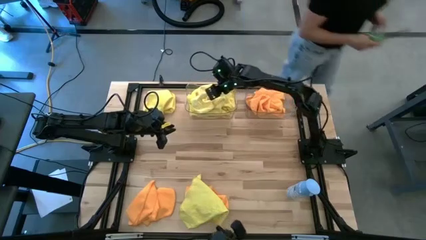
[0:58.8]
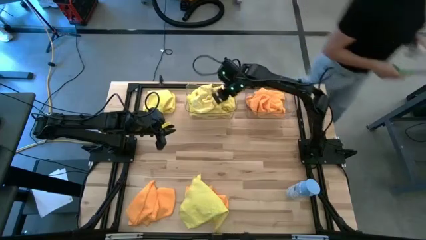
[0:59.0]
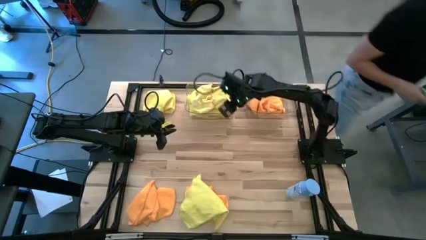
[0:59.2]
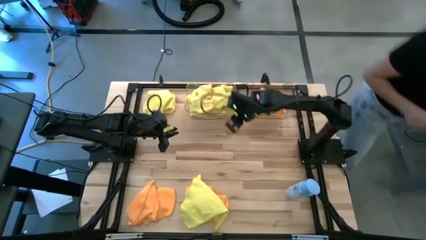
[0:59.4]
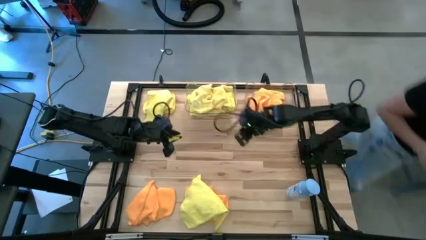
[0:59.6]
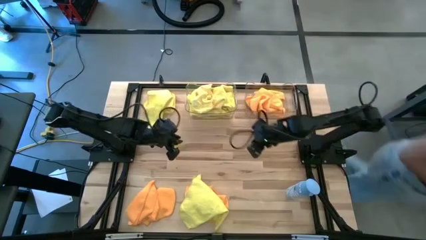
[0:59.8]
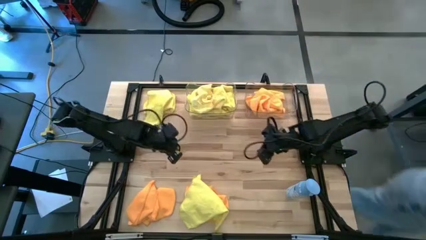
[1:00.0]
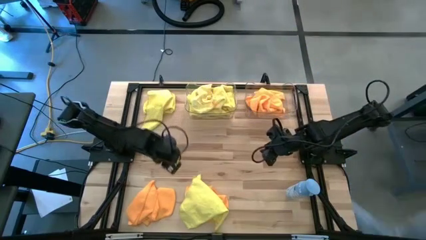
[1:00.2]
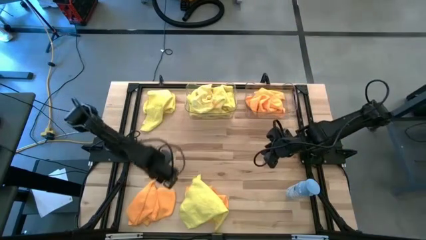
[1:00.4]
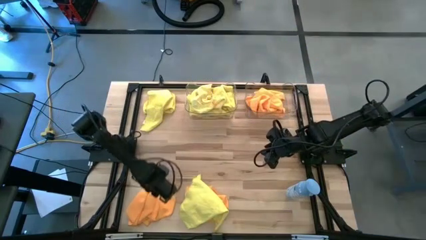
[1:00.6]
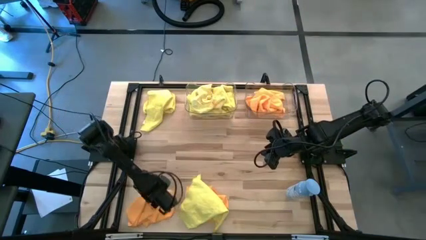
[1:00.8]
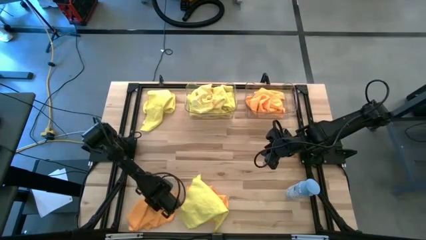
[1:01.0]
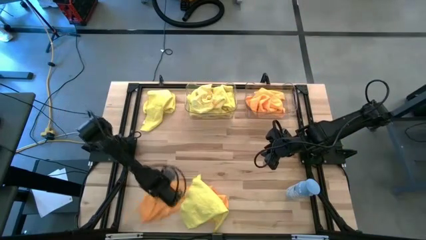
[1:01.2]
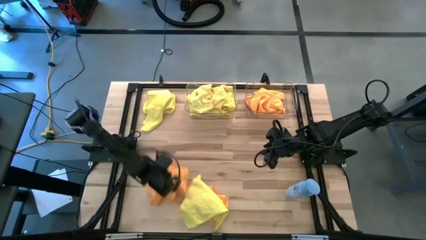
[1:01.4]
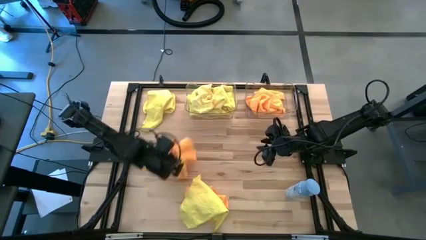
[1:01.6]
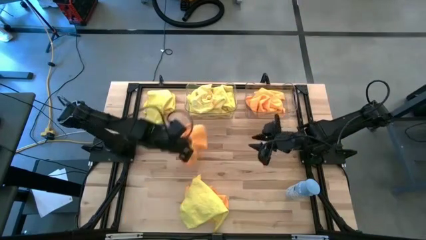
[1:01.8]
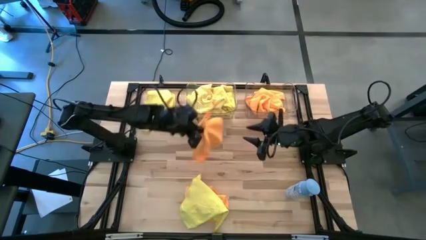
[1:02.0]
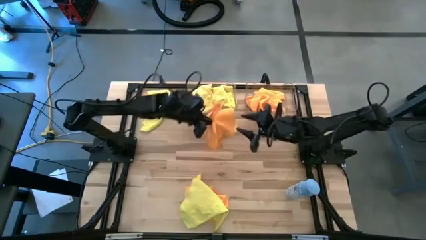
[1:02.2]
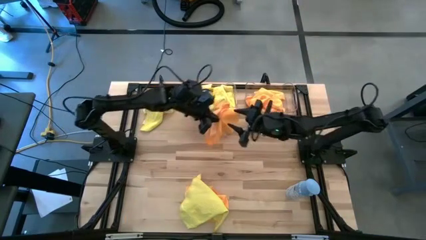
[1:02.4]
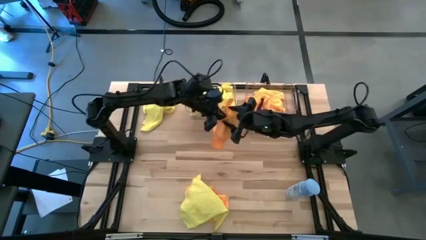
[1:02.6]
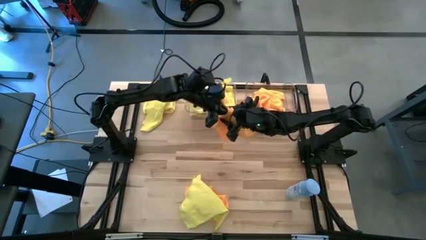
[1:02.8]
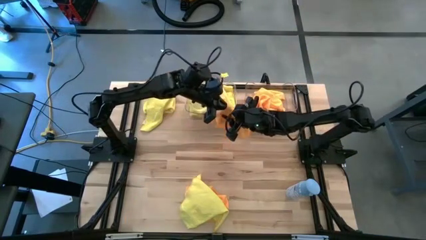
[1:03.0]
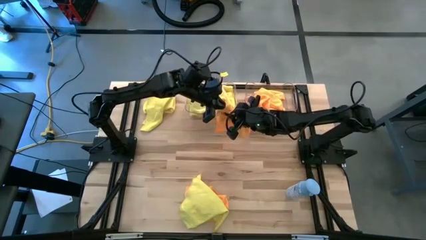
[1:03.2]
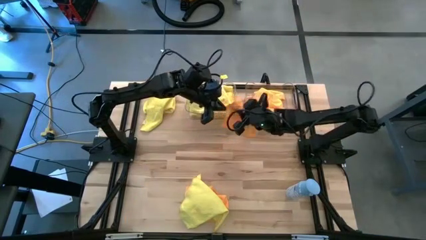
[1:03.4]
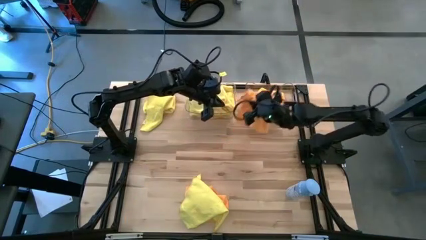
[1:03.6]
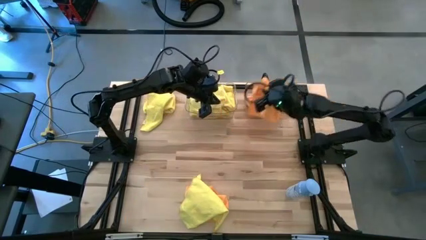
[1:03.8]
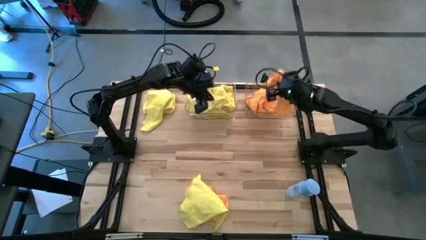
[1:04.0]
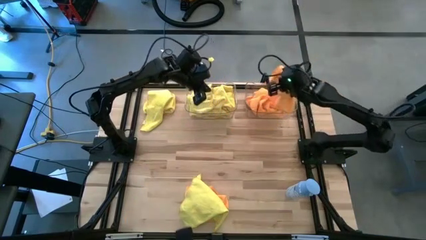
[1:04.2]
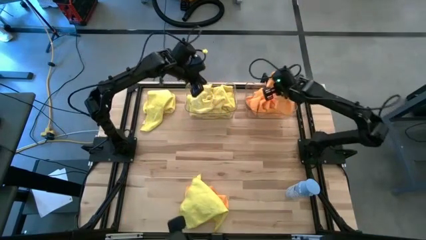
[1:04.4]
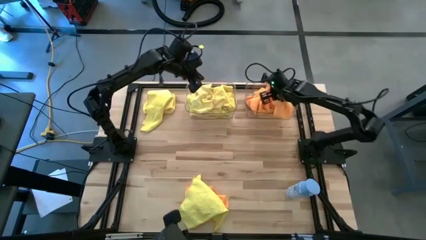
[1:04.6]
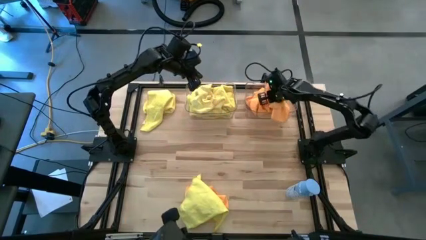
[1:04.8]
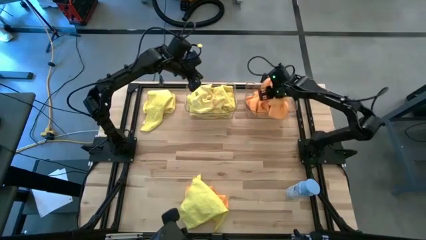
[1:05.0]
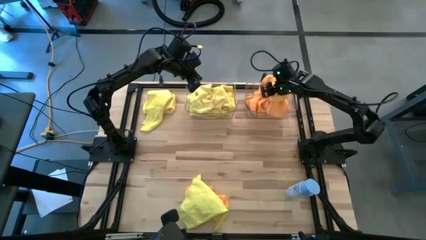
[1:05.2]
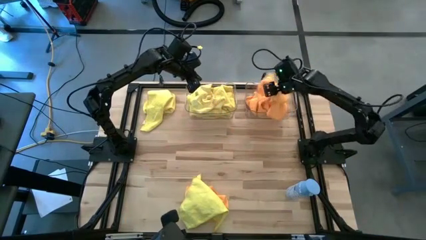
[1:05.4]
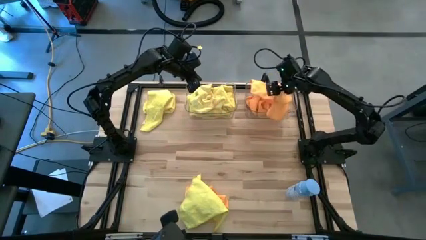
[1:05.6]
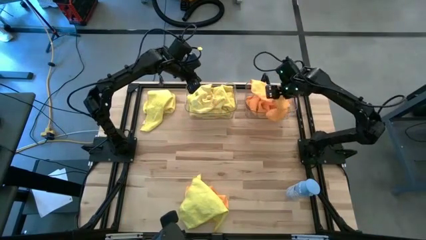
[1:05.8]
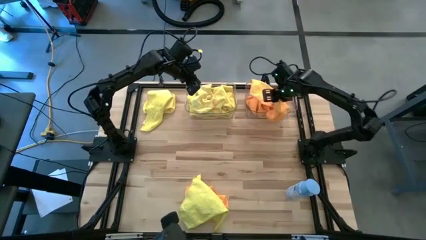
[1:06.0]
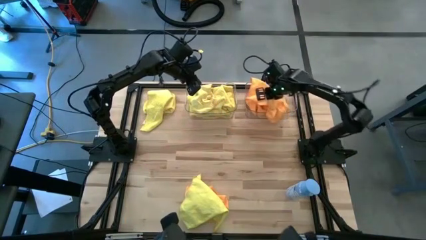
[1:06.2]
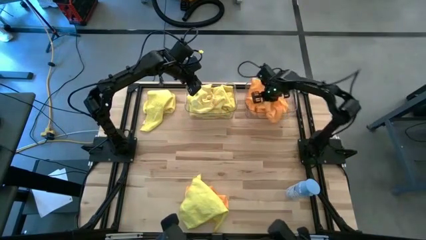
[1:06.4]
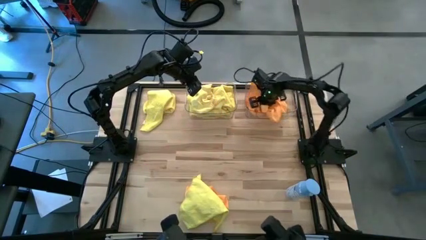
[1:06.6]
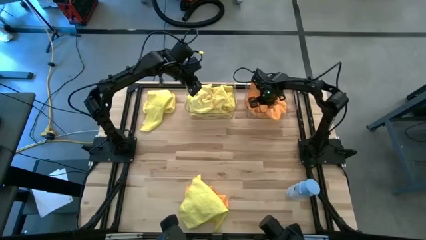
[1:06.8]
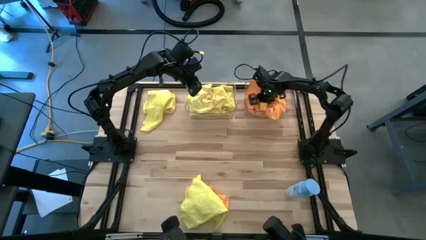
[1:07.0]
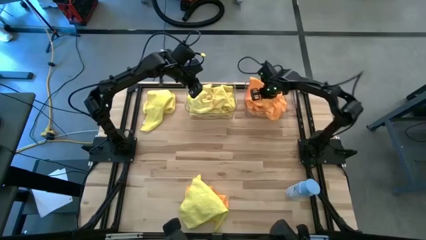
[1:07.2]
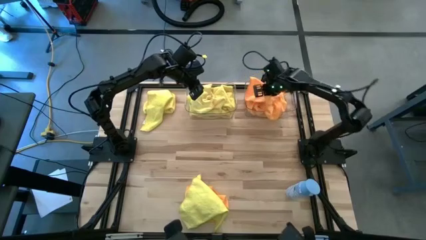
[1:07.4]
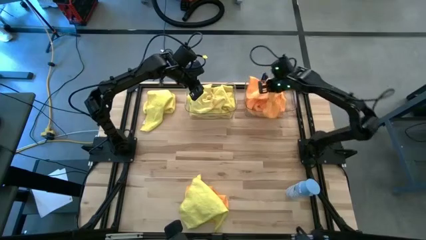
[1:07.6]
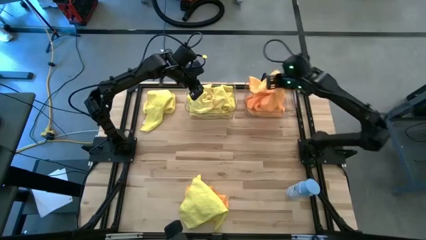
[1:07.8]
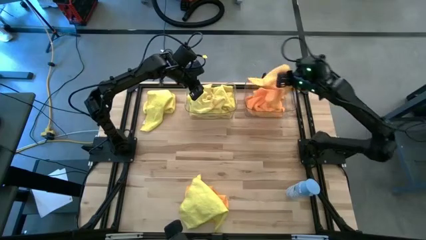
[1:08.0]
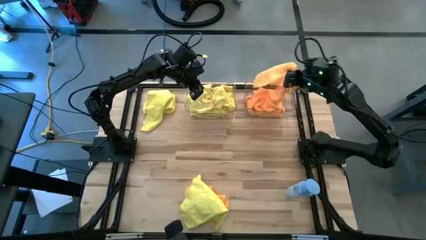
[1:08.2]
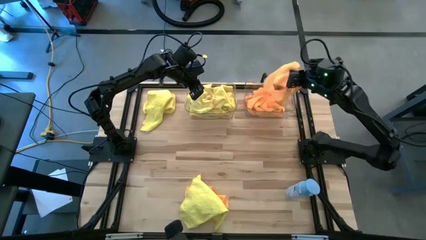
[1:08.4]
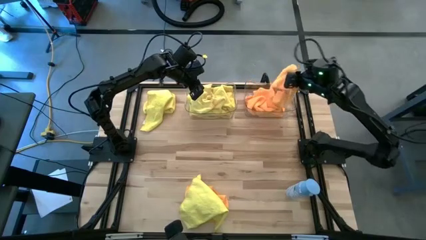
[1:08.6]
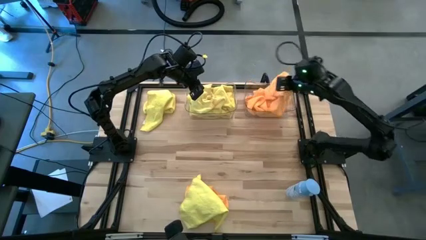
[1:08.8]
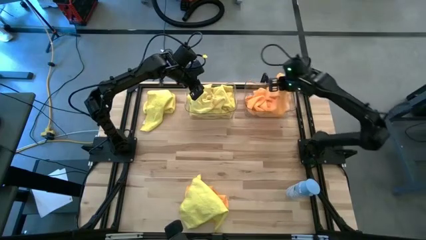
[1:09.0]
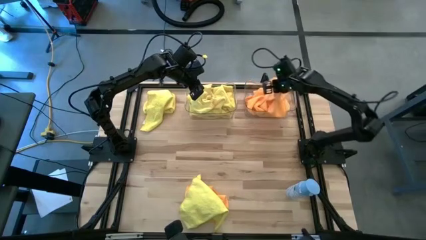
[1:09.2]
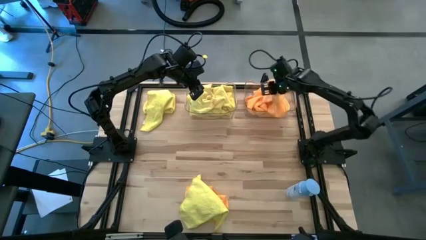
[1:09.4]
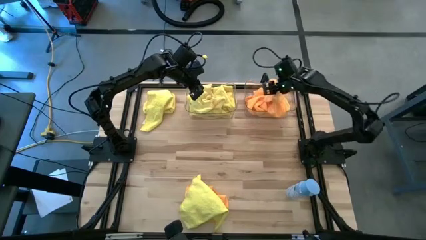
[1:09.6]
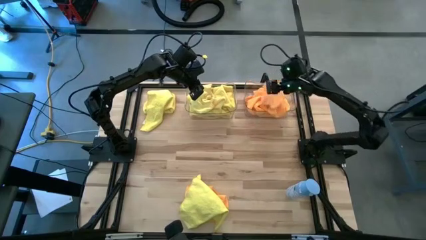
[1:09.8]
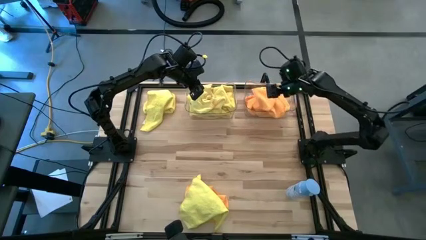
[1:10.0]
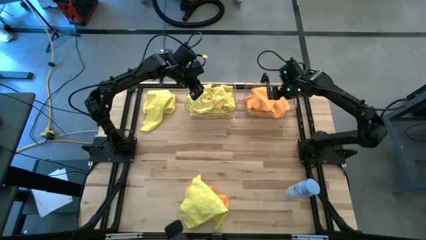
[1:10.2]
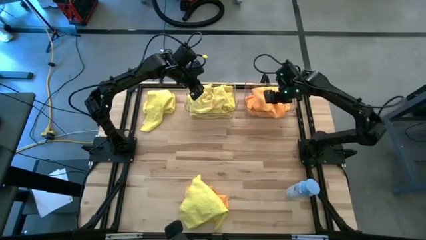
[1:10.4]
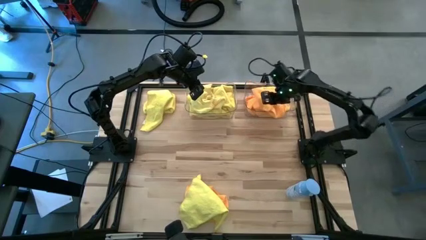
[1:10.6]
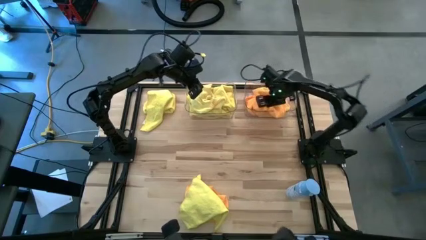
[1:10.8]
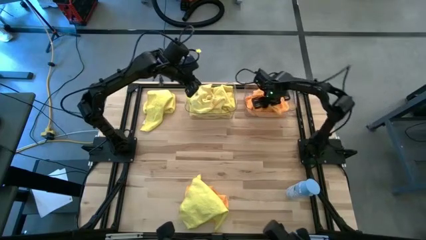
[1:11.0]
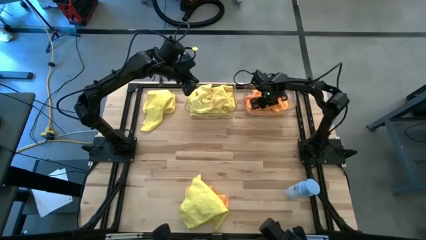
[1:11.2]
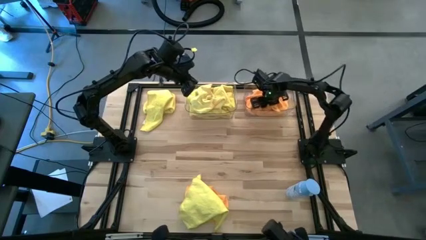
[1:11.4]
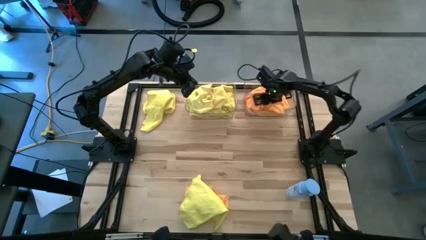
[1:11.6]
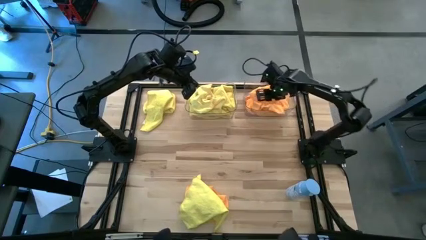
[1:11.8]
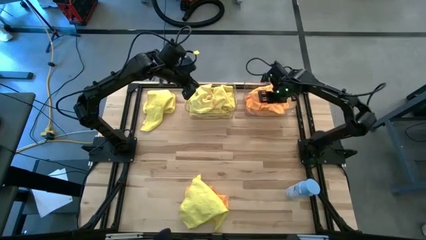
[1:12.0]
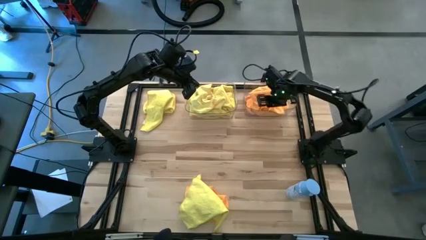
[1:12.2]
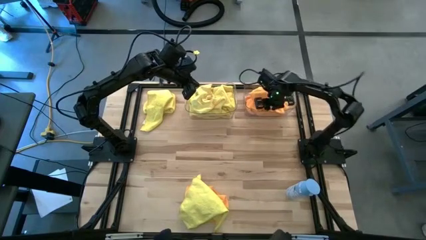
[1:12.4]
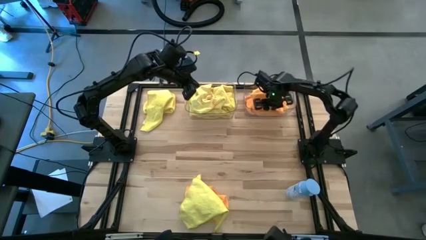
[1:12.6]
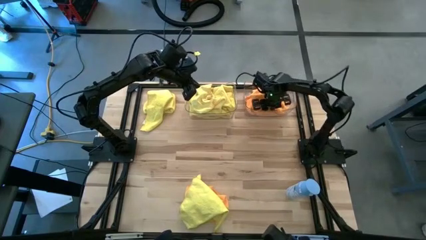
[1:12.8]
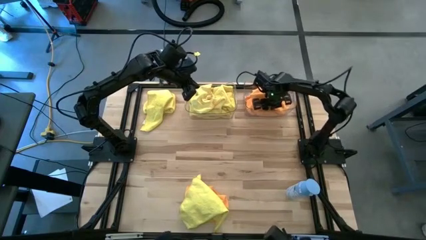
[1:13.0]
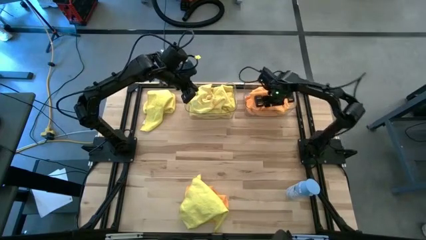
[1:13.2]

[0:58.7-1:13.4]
Task: Sort microfiber towel by color & place in baskets
Put the orange microfiber cloth into the right transparent bin

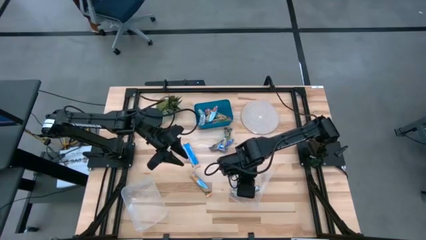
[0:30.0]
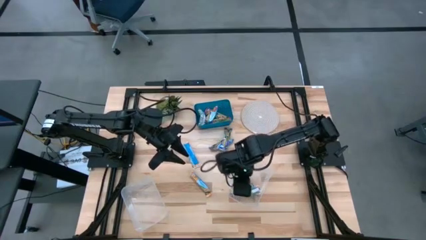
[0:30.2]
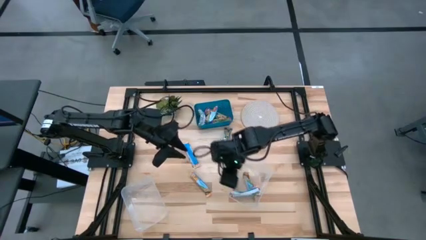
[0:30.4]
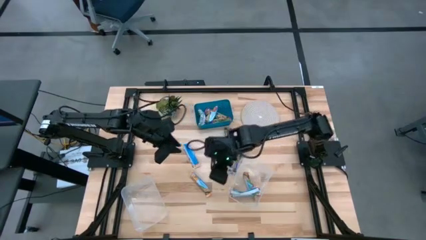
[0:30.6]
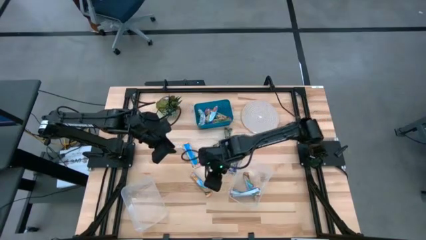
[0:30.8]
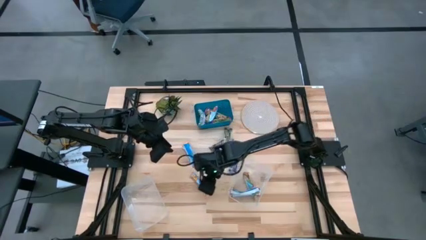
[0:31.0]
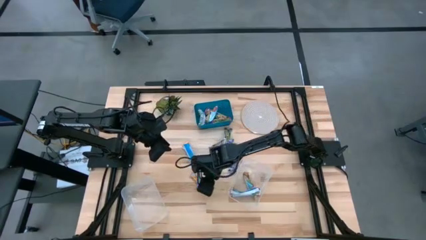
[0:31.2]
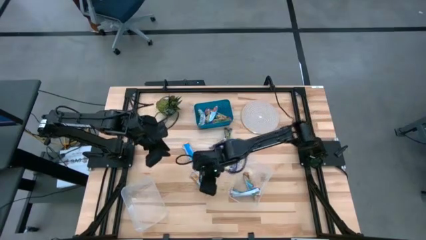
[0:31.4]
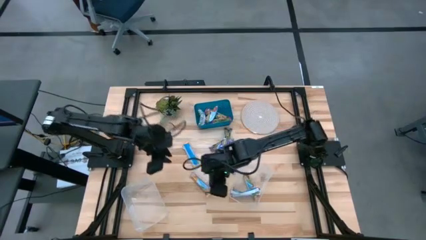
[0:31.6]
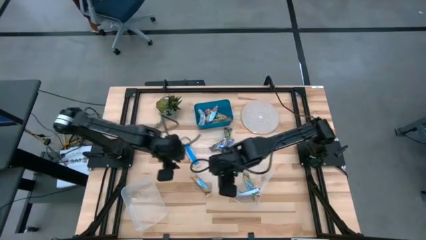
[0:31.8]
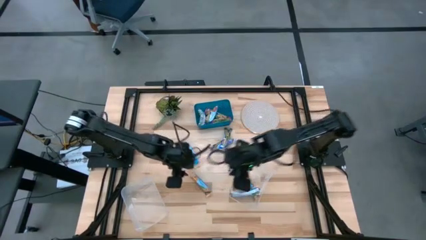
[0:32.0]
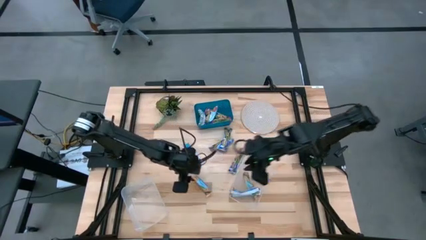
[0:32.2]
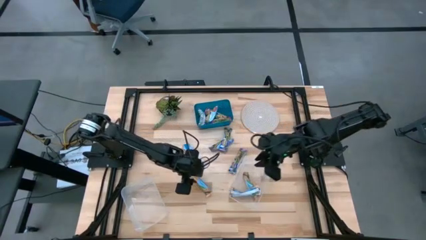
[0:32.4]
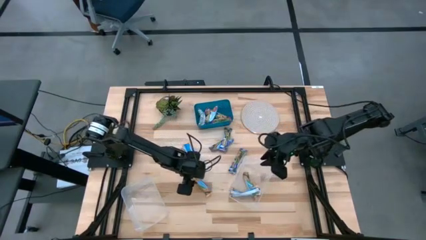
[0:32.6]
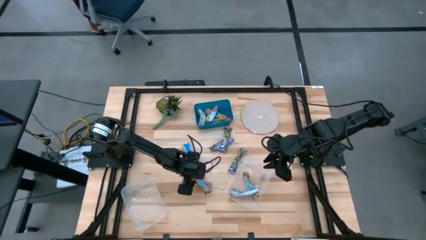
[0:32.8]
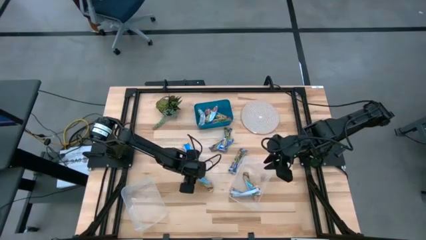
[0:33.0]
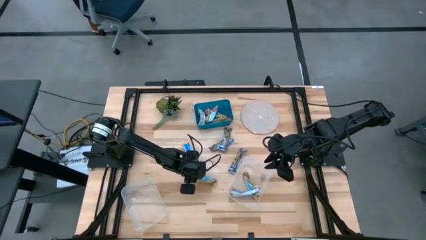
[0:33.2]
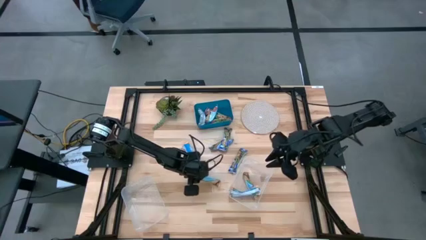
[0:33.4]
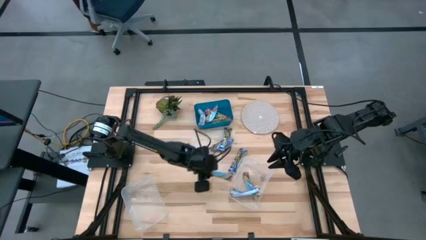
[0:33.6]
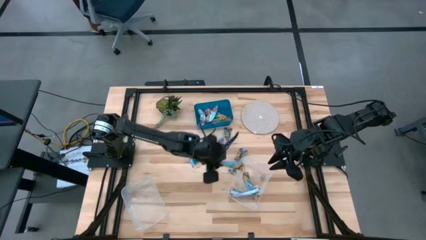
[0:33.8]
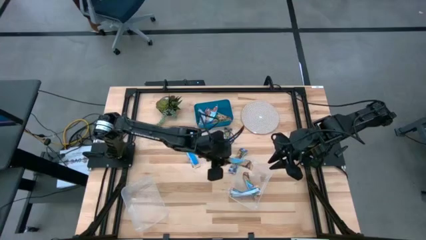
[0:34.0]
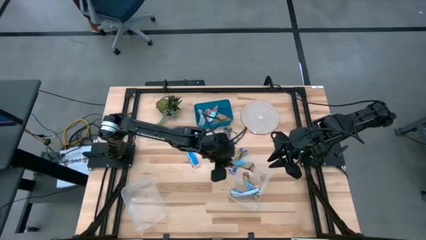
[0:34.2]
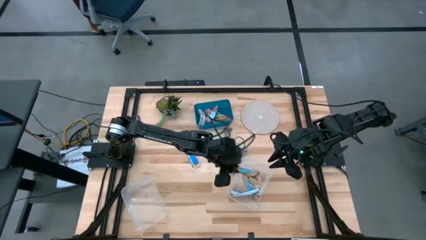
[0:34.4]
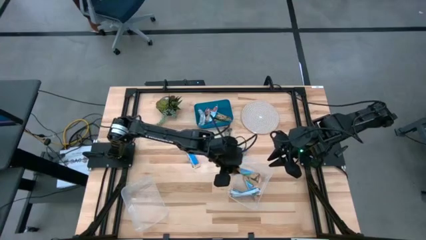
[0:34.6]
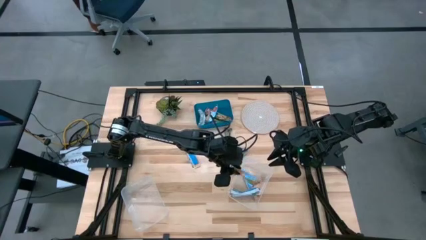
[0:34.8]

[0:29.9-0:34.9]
Task: Pick and place Granola Bars by type
Put the yellow granola bar into the right transparent bin
